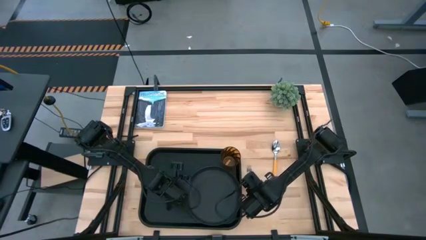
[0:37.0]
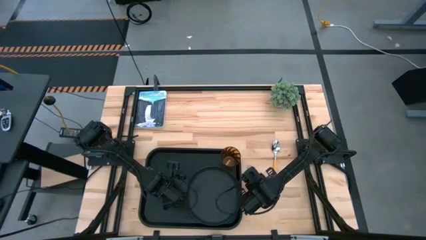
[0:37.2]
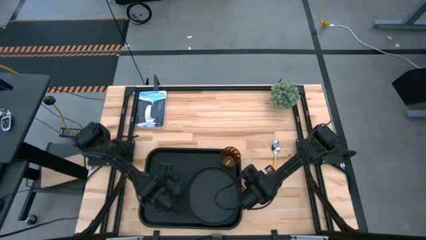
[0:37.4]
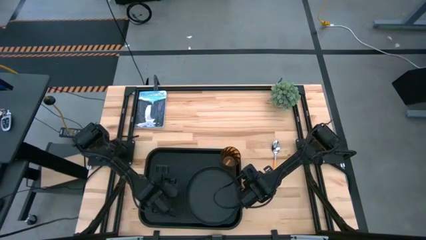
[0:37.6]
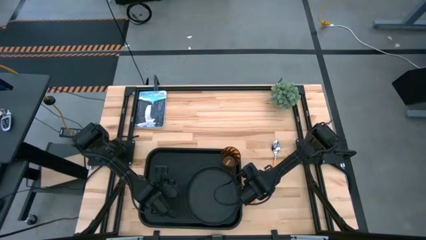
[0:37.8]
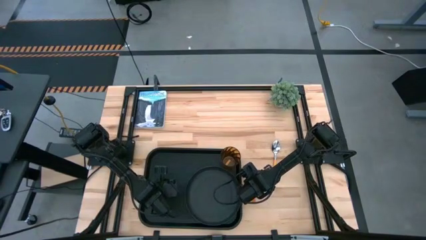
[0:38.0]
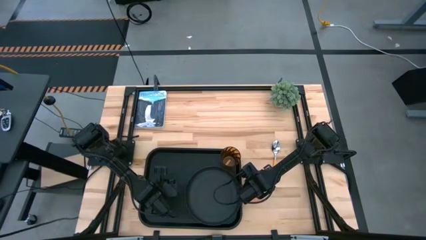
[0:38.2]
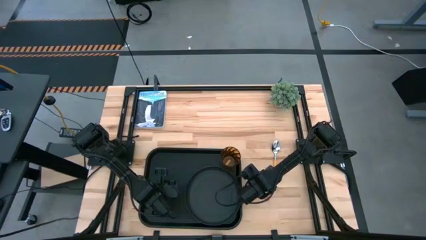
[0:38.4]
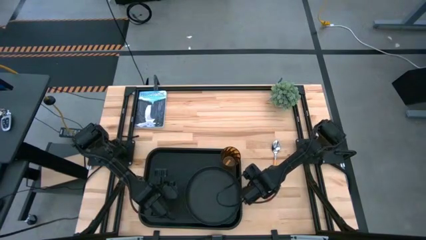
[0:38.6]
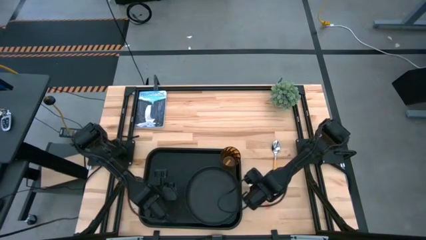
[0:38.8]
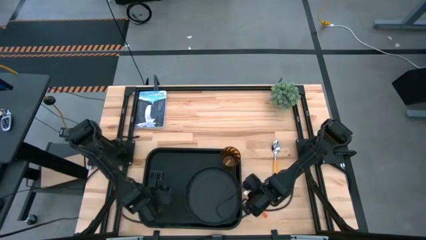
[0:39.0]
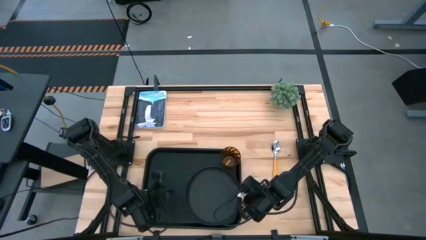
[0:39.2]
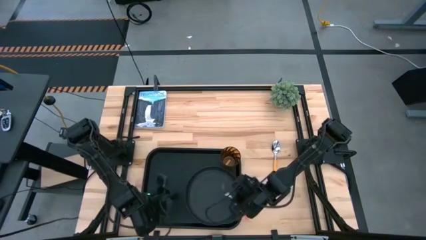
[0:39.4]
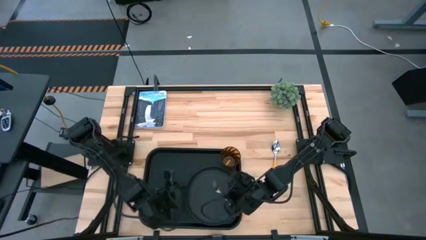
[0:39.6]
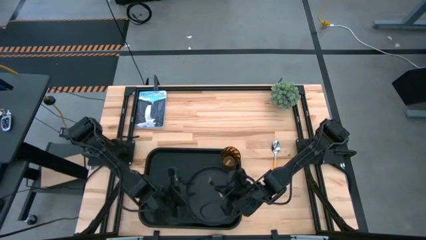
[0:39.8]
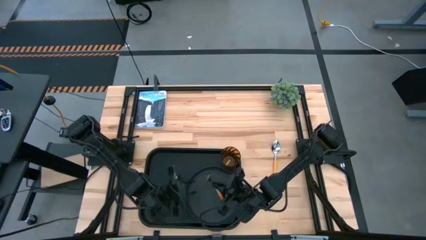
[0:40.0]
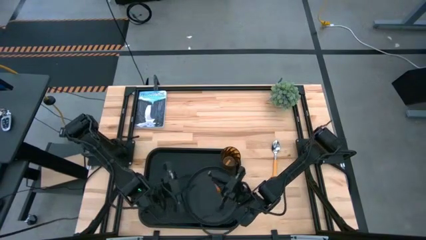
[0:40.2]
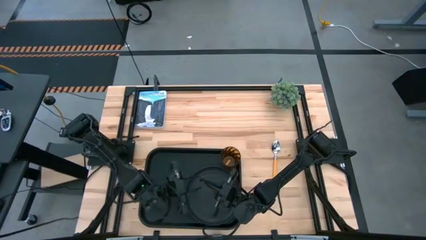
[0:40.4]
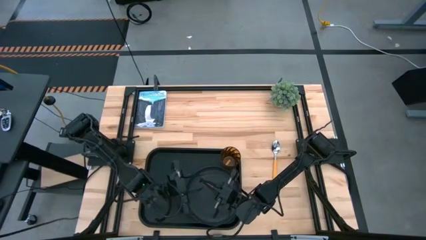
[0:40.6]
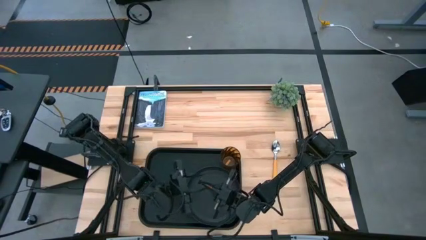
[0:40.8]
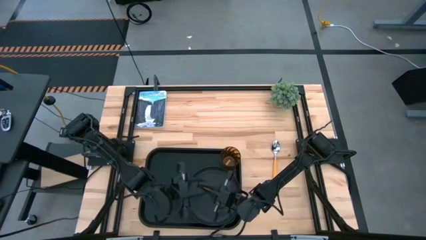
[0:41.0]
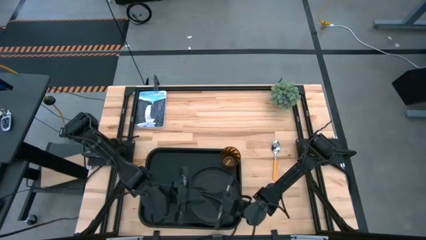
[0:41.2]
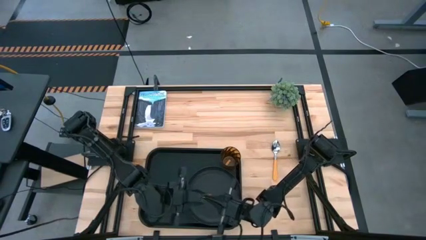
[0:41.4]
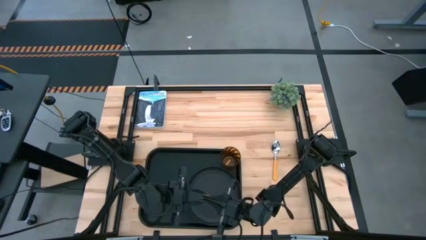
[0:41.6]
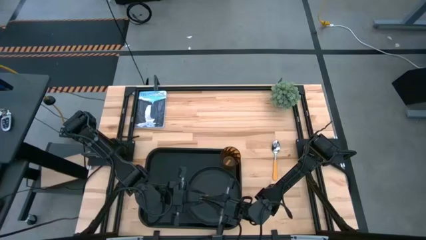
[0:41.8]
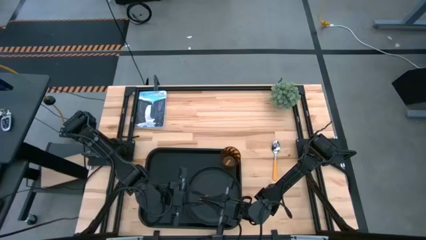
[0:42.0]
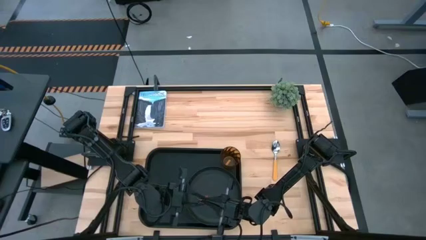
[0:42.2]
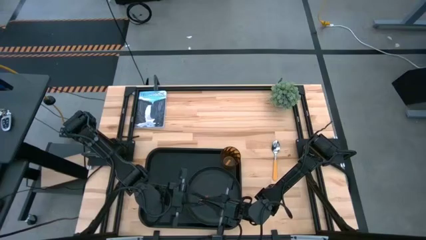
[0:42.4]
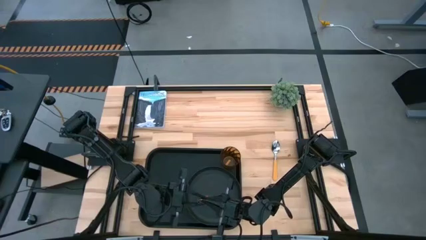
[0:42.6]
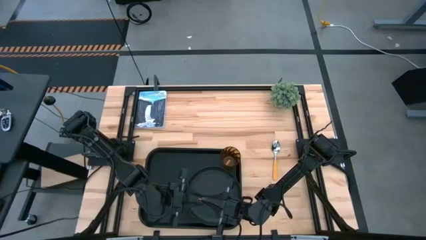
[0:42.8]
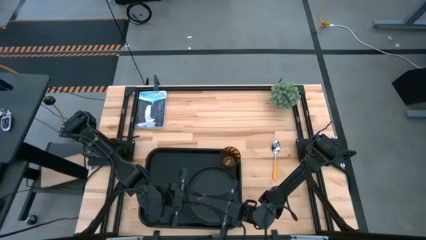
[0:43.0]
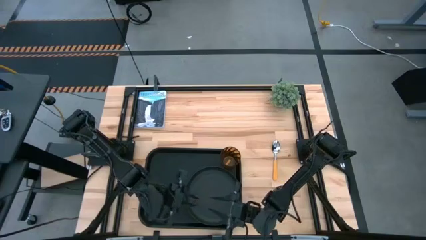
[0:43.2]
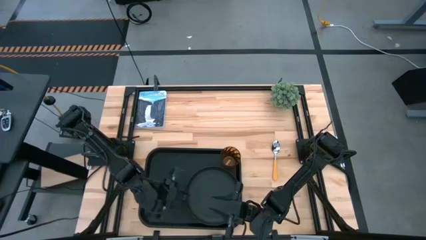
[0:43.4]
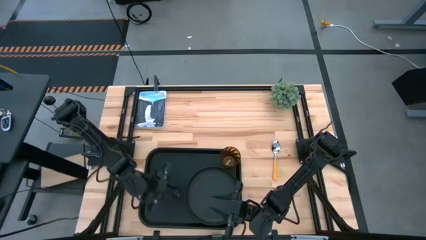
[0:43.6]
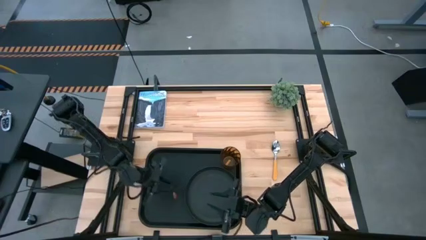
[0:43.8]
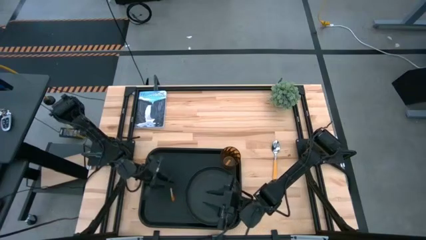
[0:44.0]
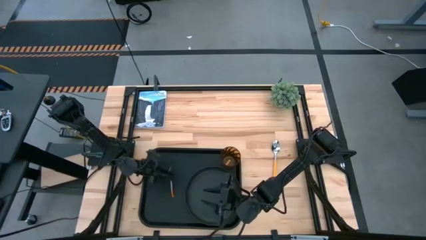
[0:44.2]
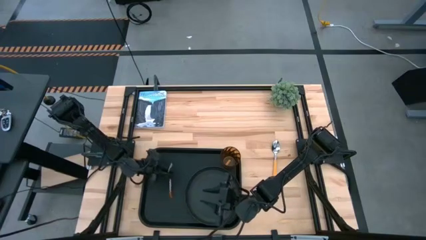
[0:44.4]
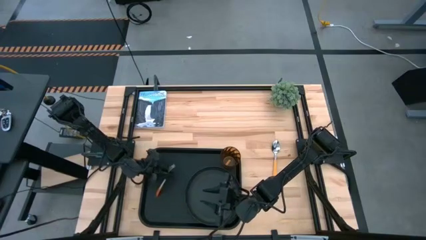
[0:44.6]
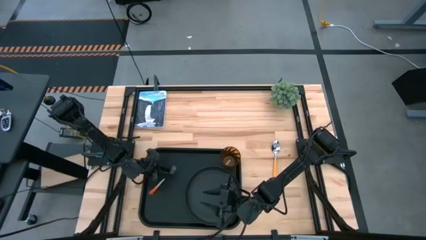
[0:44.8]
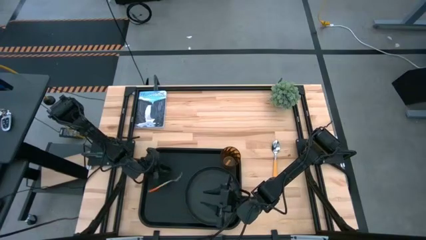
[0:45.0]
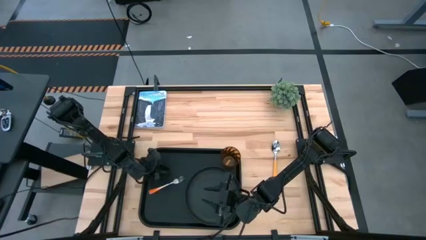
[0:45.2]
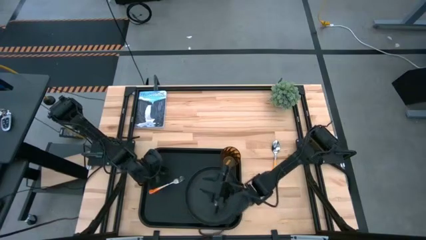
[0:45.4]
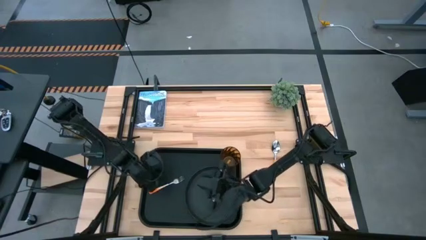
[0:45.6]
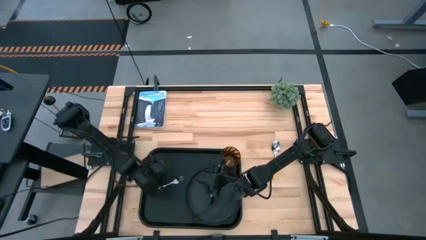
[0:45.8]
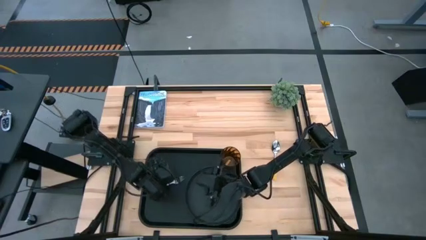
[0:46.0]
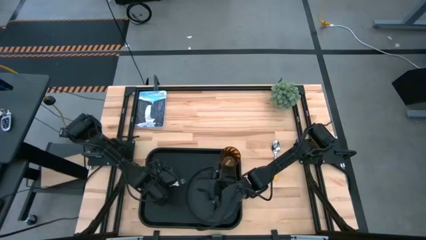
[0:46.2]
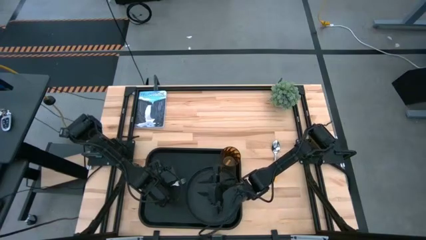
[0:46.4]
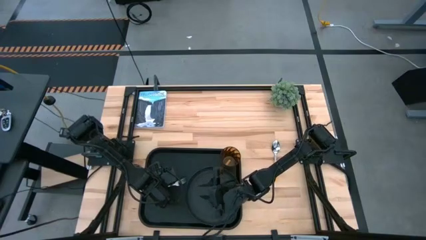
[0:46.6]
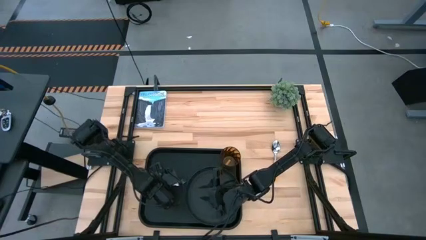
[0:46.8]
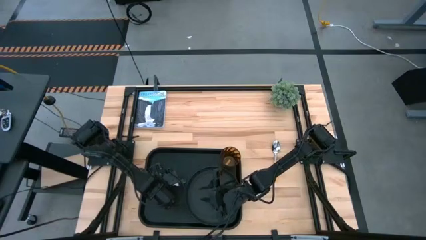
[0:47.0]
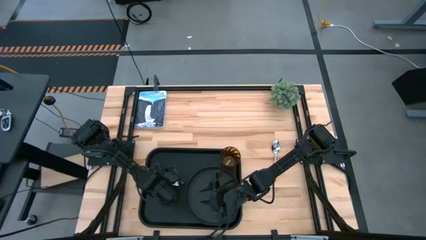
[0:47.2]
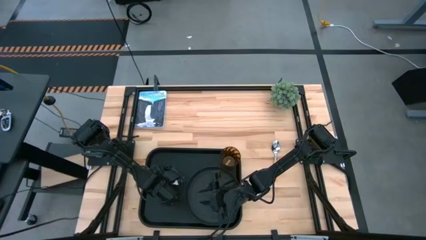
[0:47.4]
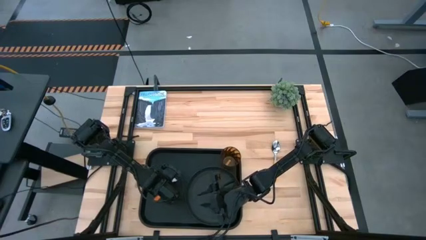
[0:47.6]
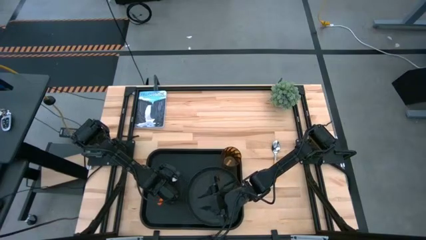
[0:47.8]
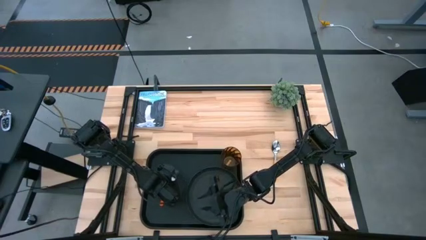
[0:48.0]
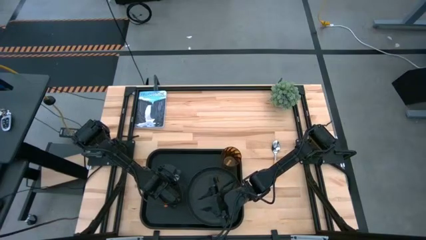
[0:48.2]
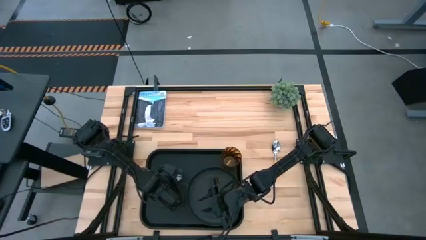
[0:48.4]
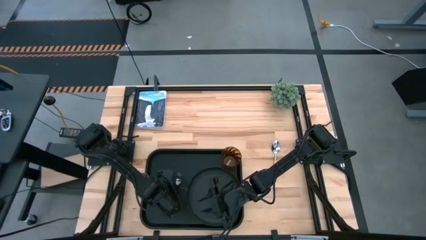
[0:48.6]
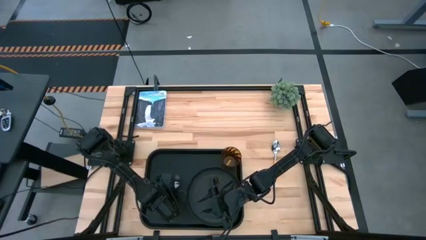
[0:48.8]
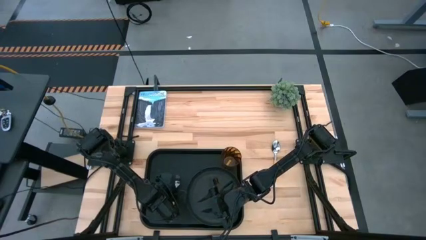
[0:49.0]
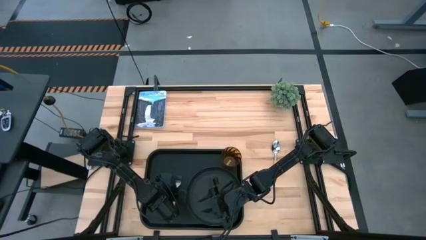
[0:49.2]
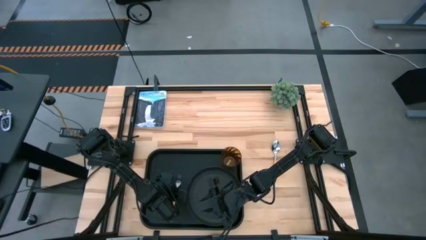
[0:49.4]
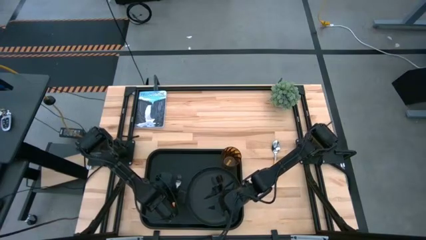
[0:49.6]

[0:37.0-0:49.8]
Task: Pick and place plate/cup/fork/spoon on tray
Put the orange fork beside the black plate on the black tray

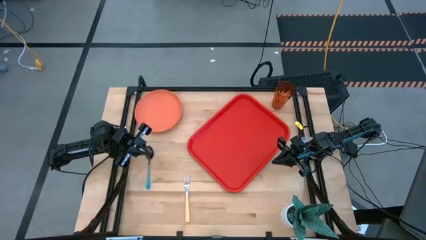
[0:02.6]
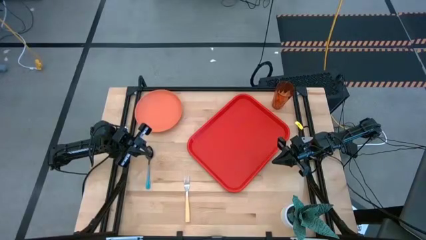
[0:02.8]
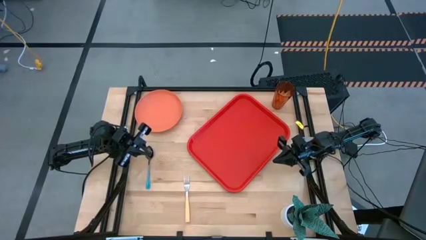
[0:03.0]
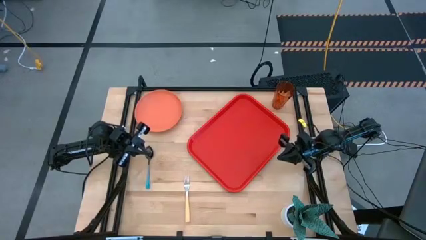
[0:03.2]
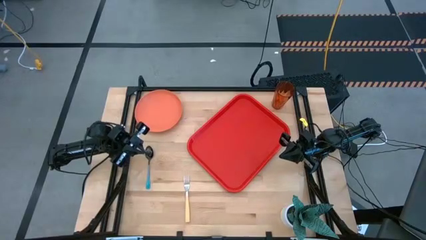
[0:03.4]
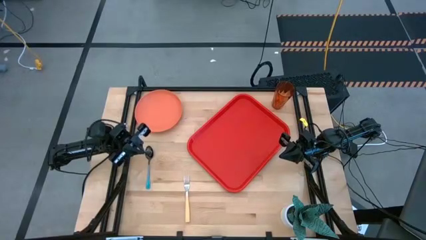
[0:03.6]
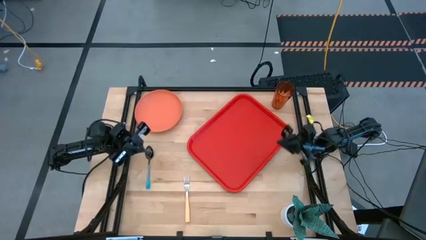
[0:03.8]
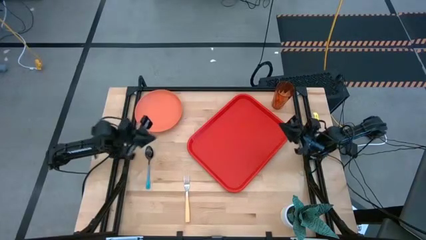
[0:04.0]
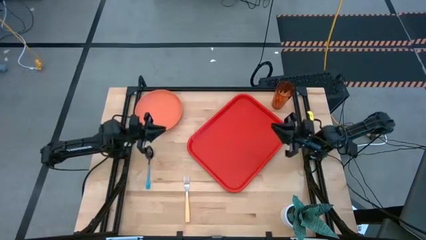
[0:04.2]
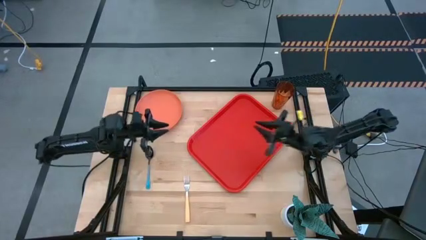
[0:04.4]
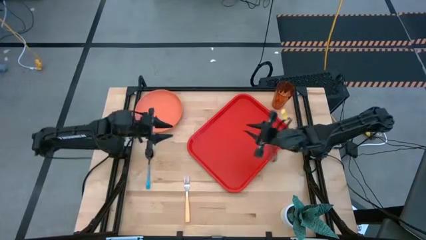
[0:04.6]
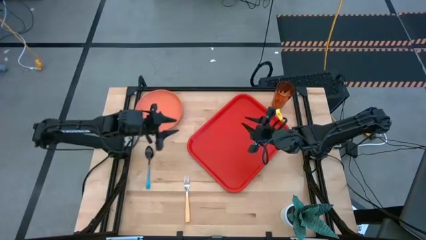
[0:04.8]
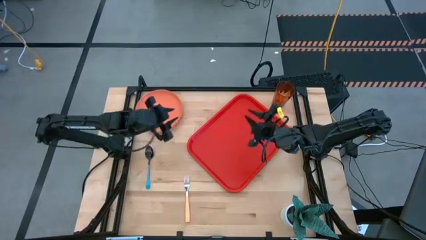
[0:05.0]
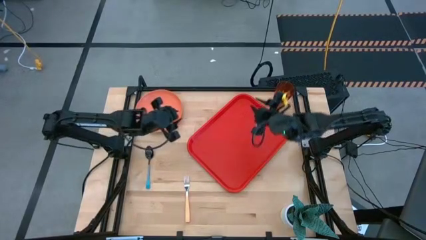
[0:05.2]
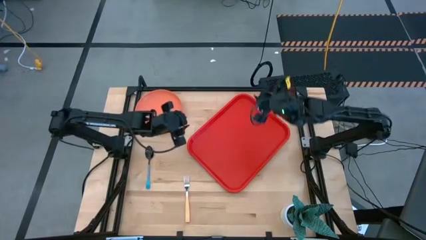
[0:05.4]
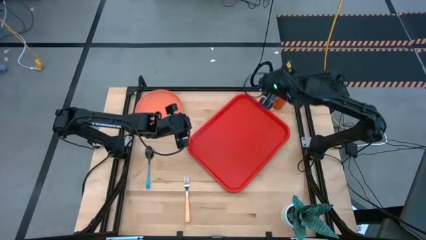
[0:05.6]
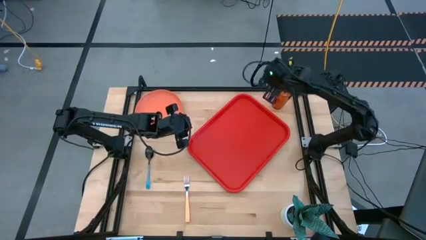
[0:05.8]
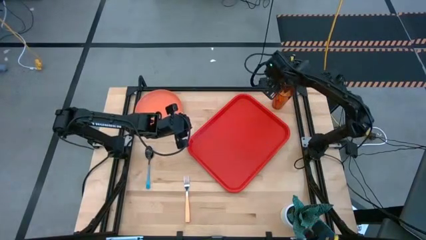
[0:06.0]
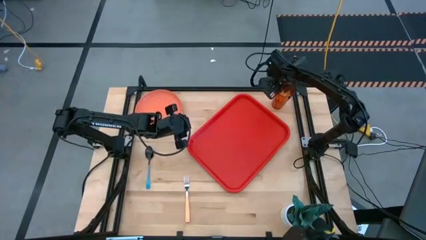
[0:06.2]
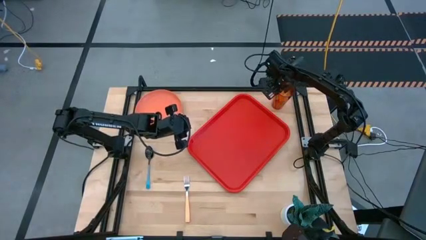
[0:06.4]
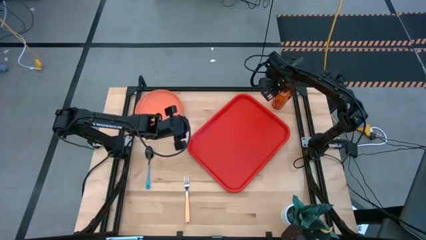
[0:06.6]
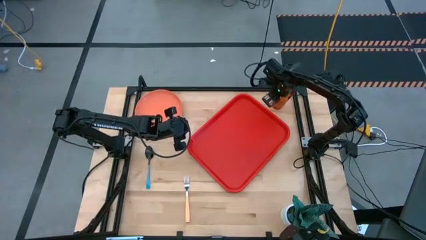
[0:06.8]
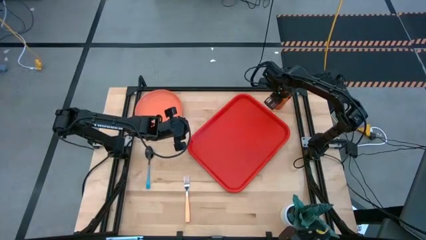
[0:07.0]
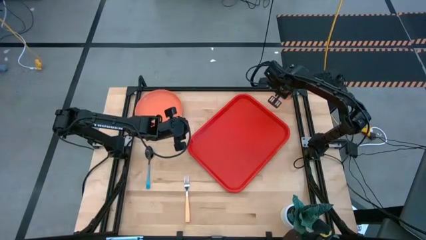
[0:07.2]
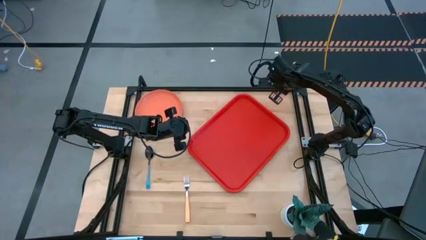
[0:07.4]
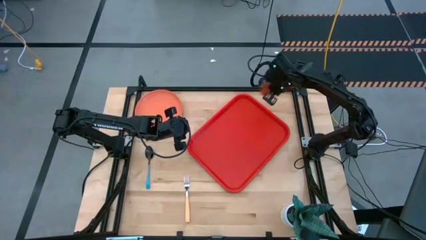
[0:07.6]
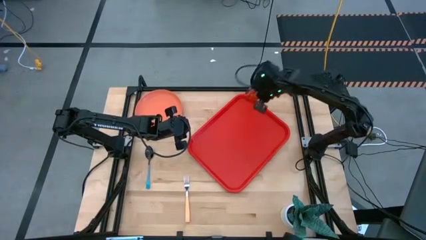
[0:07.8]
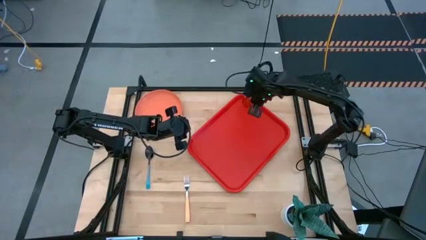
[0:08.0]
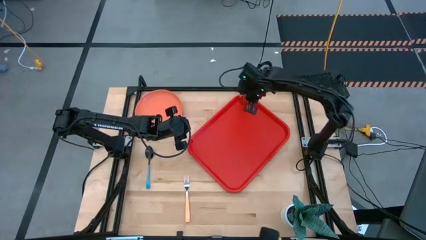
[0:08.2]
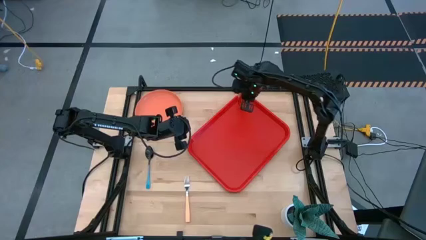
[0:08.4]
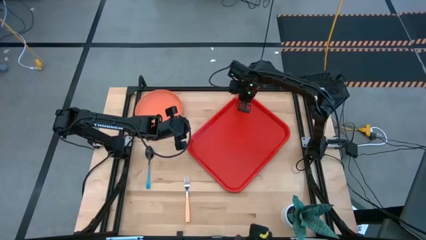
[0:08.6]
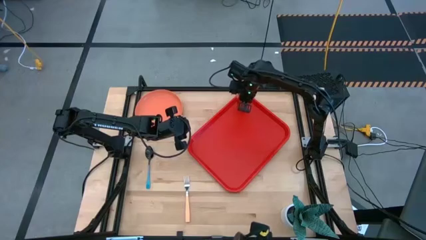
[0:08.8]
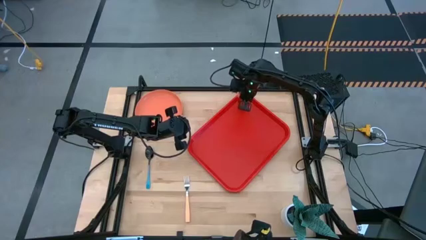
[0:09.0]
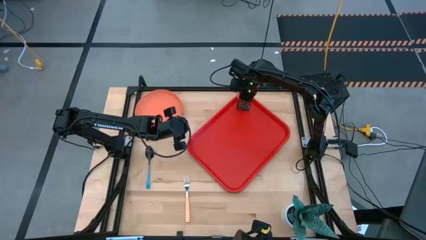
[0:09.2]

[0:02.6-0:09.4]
Task: Pick and place plate/cup/fork/spoon on tray
Put the brown glass cup on the red tray
